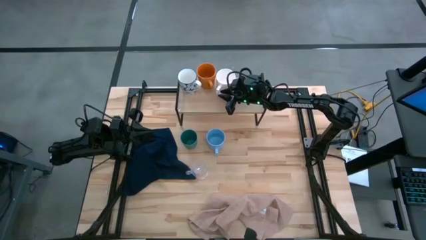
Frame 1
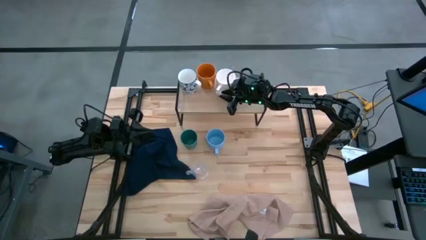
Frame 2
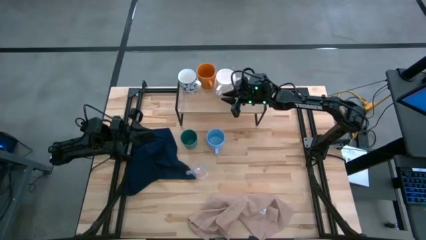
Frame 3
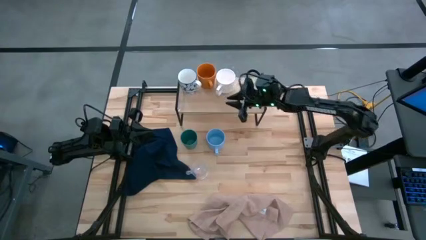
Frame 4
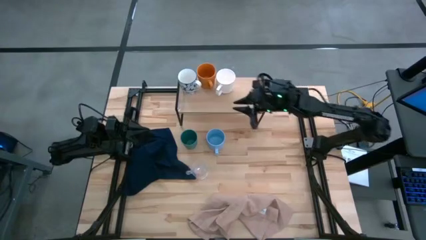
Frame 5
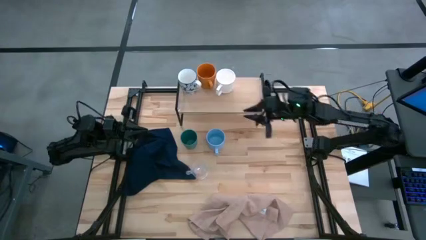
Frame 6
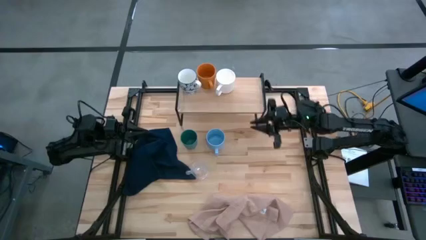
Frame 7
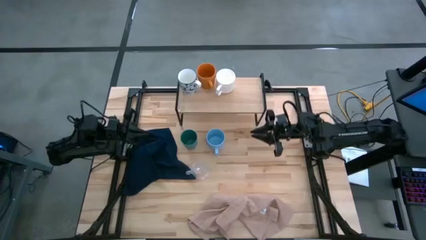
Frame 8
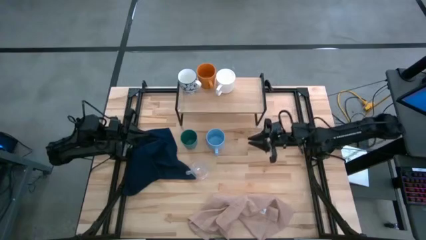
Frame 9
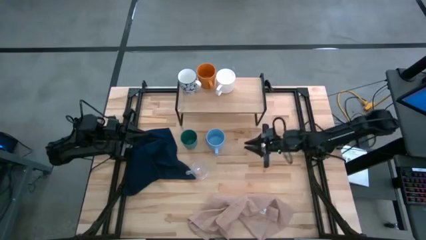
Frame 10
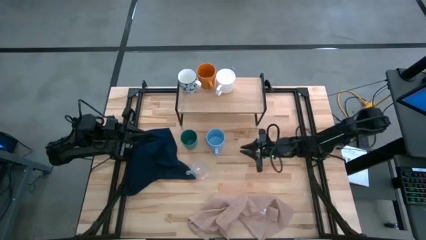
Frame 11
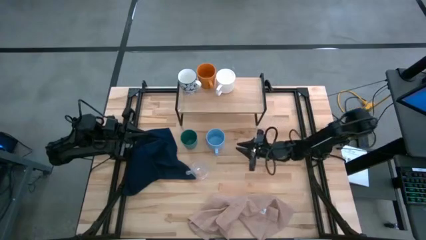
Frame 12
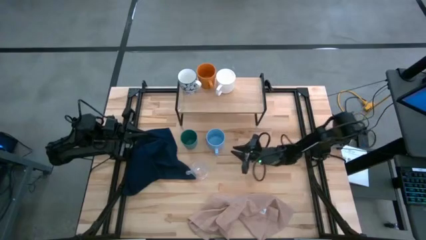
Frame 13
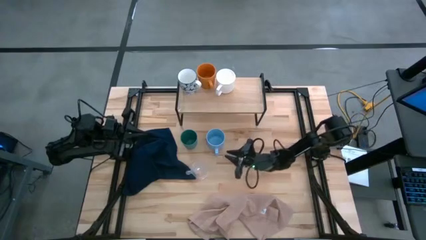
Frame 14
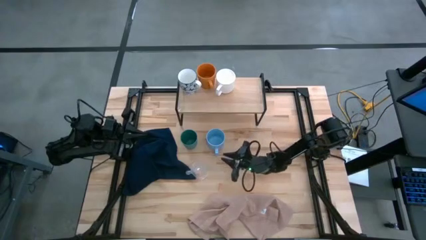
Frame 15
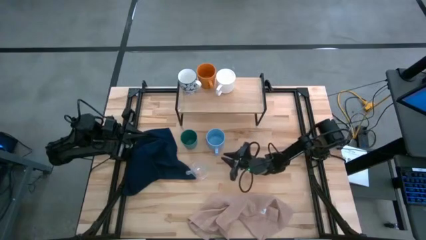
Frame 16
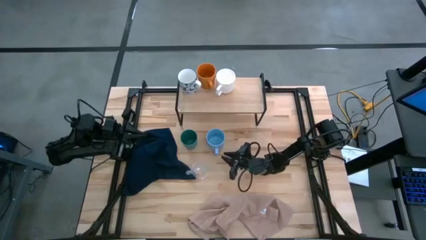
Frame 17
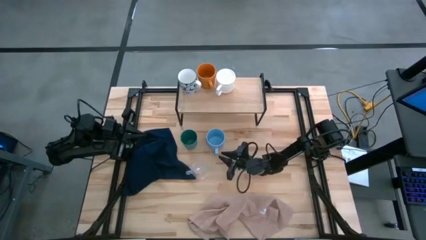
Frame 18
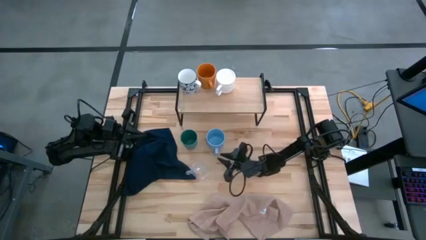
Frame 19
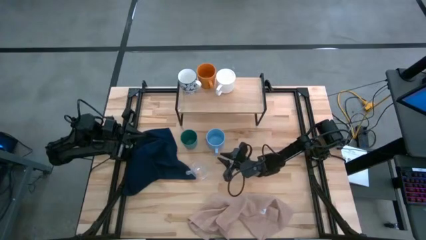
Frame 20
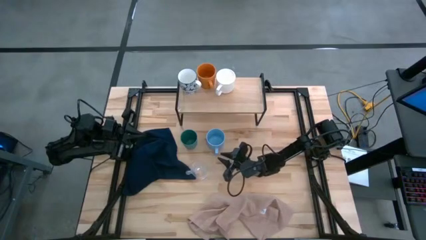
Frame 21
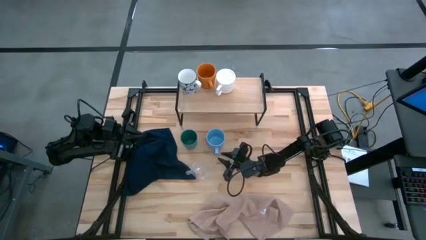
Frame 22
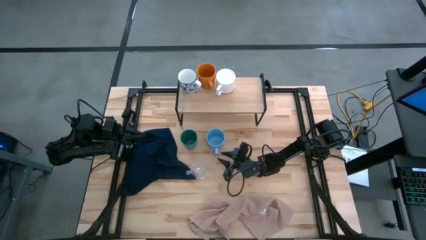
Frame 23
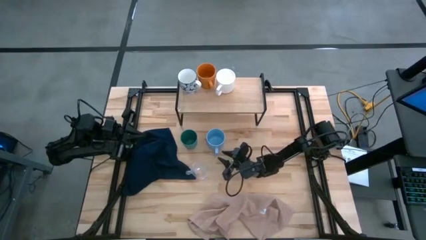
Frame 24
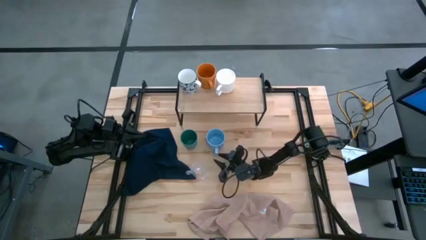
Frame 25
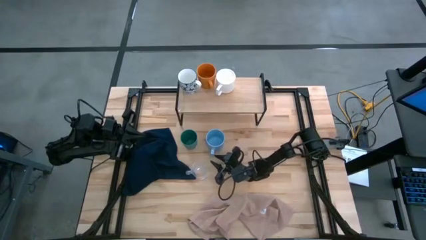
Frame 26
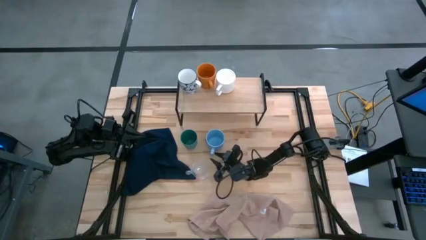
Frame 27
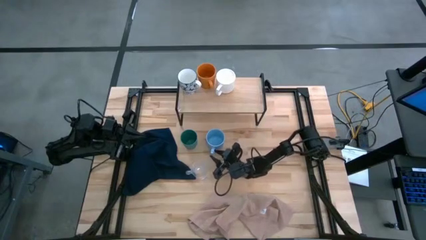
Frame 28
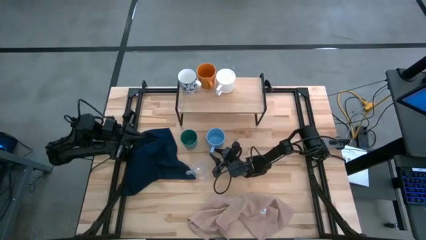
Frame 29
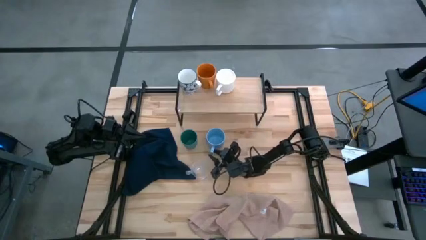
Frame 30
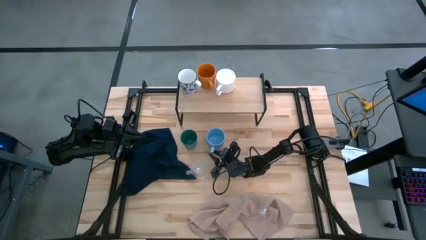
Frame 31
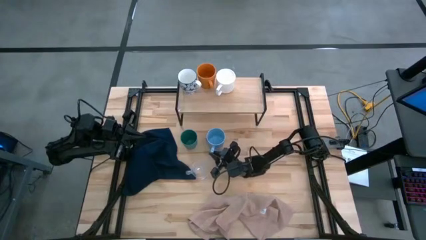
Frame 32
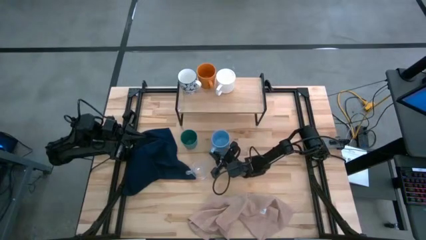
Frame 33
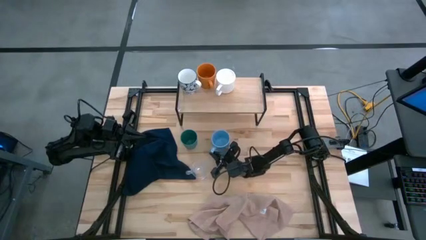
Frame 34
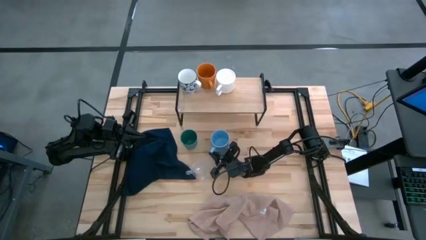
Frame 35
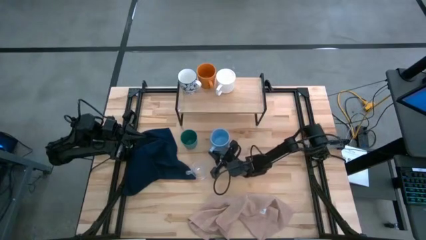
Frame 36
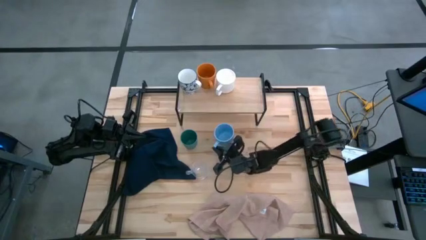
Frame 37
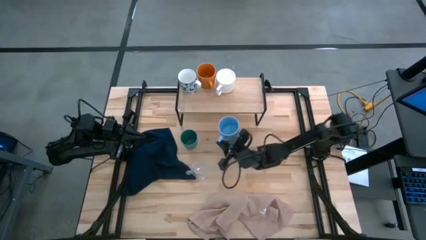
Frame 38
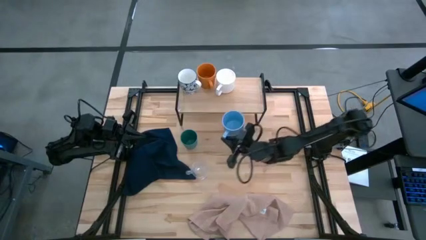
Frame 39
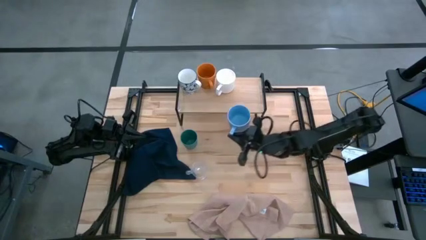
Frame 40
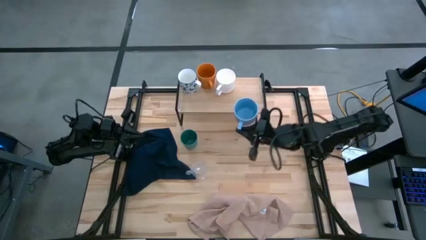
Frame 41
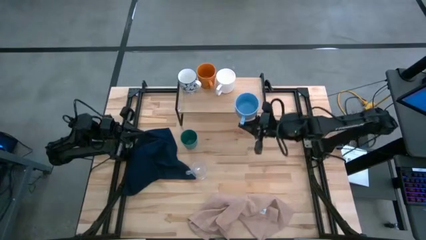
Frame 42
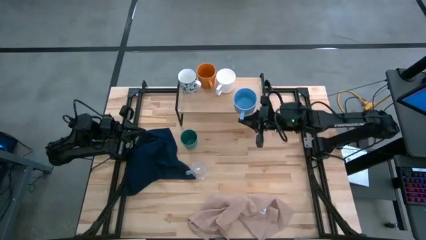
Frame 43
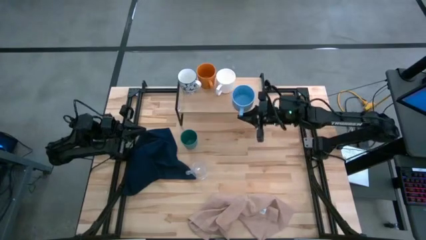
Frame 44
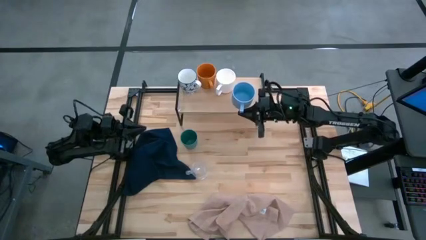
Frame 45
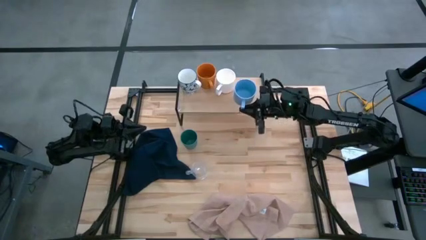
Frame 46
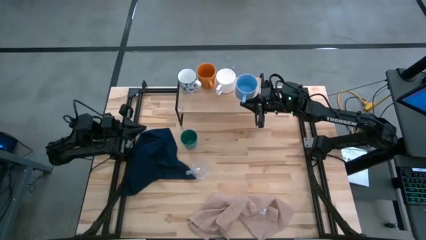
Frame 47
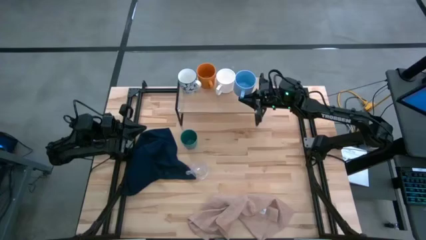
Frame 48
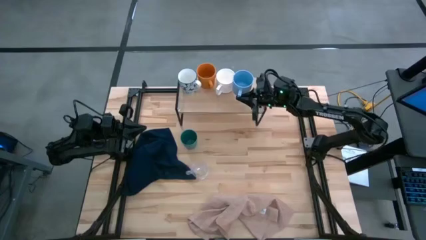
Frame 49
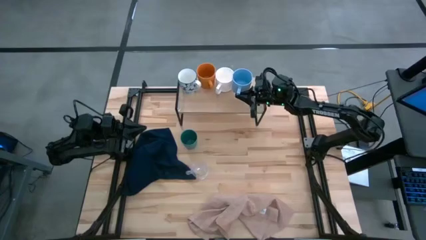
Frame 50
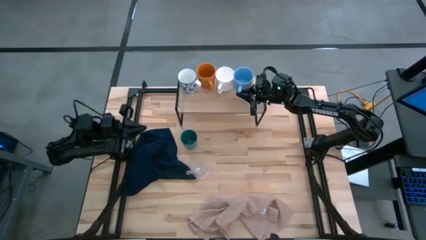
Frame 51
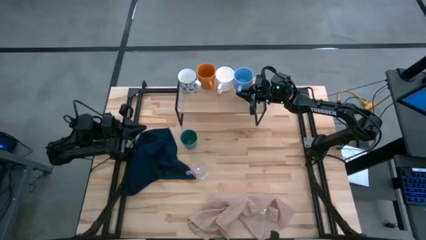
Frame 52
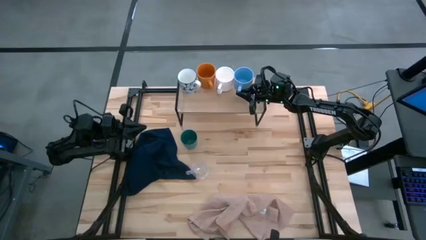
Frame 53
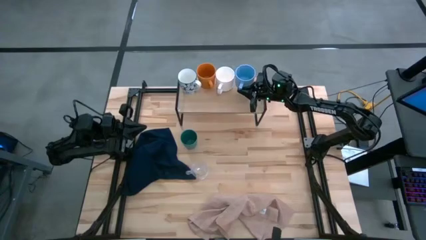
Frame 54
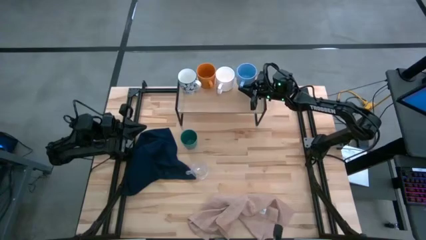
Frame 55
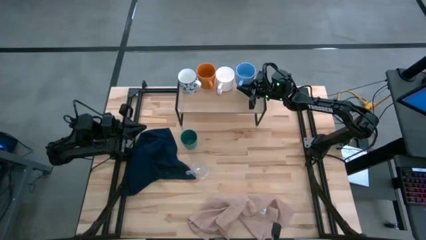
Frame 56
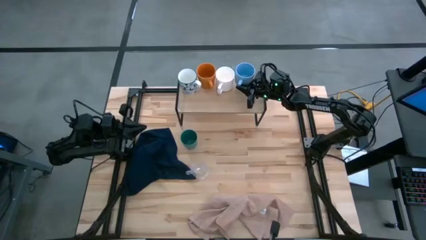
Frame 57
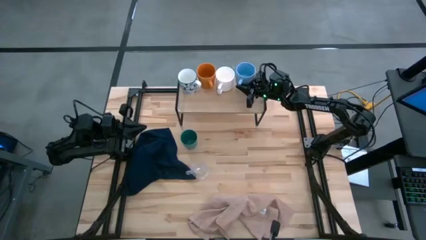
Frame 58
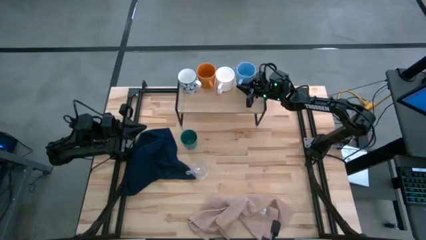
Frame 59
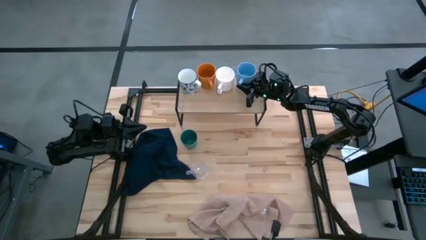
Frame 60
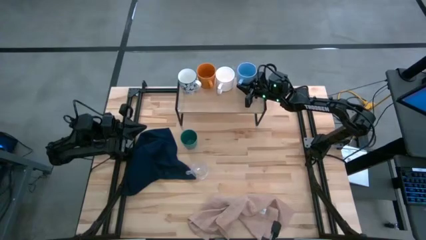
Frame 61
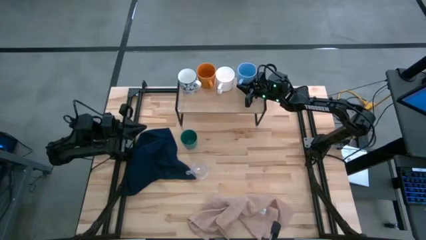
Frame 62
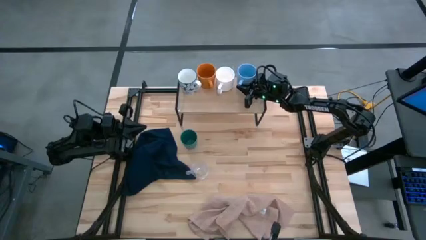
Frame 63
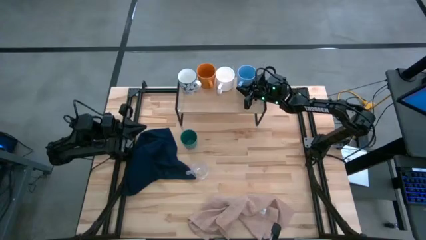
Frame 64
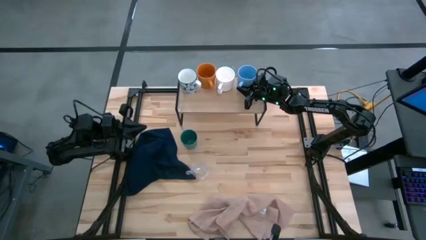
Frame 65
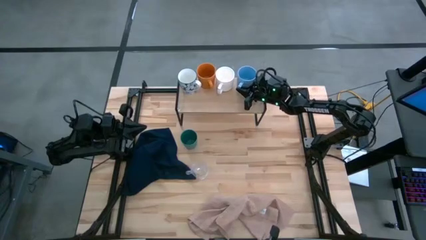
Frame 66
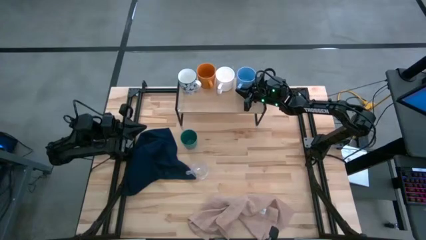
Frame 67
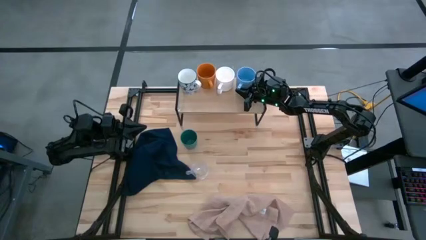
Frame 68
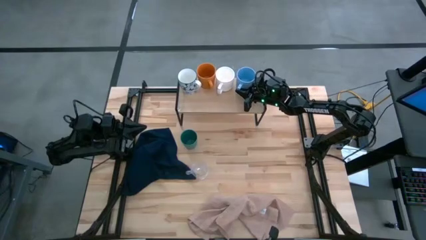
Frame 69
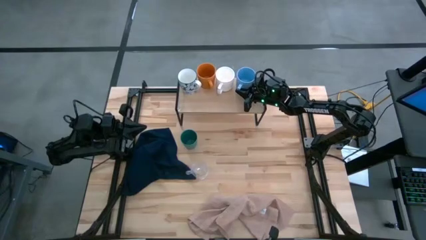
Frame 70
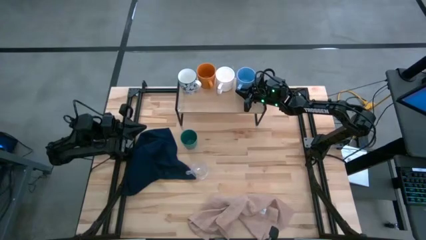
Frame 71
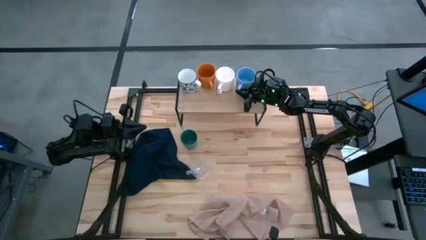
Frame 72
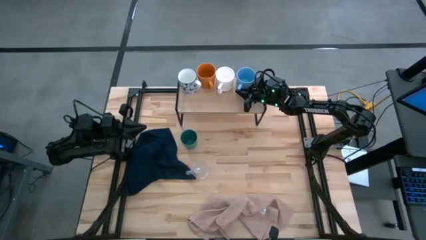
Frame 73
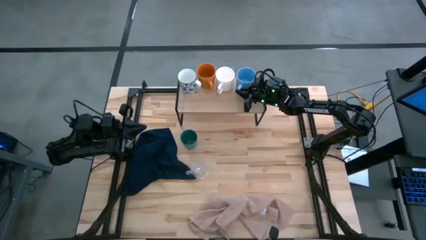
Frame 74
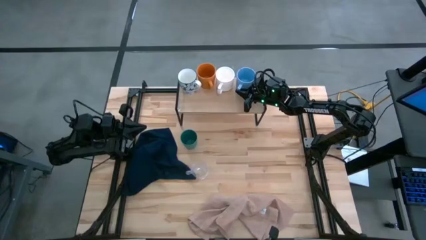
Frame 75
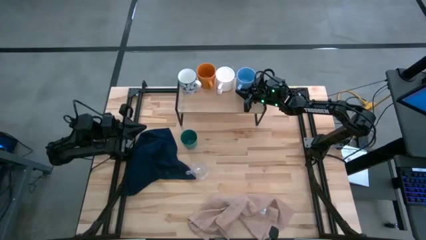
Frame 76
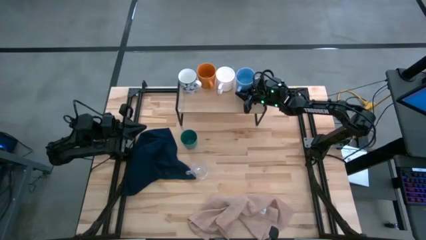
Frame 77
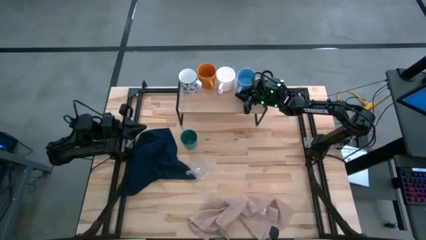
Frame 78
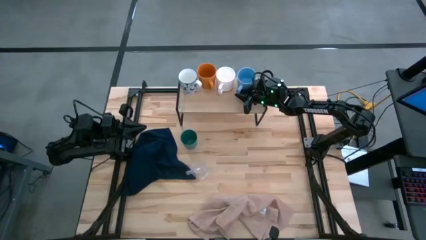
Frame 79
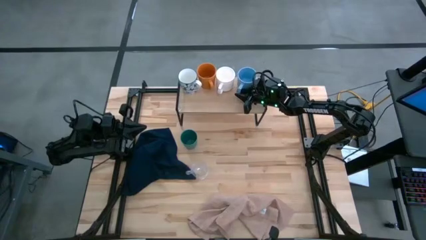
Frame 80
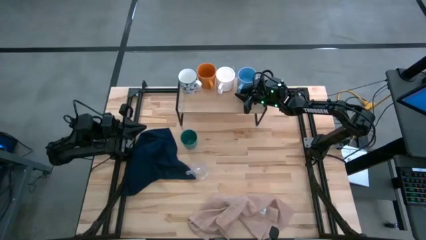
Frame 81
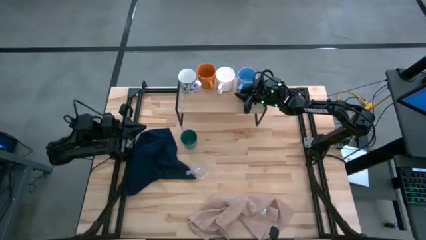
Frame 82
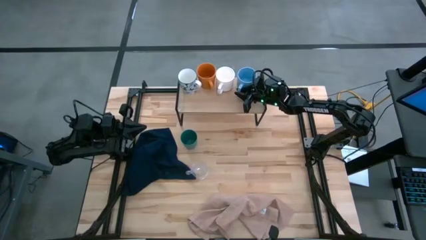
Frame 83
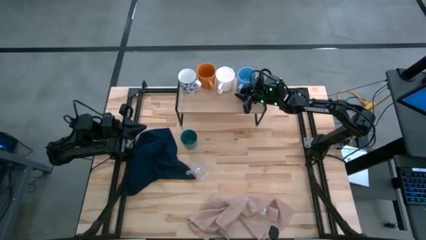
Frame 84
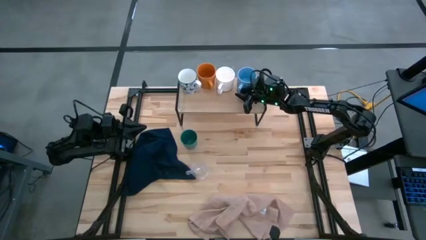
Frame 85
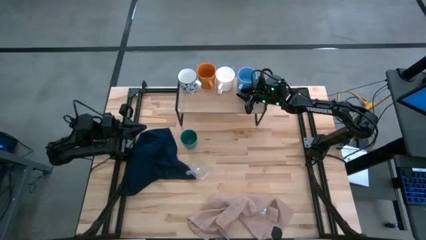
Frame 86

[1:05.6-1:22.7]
Task: Stack small to large cups/mugs on shelf
Put the blue mug on the shelf
